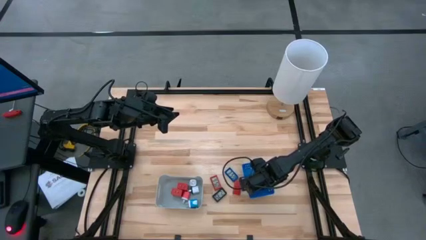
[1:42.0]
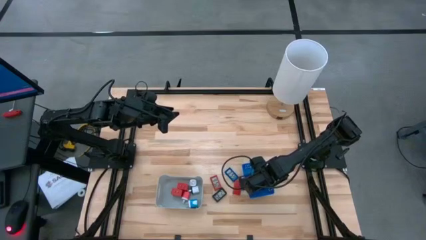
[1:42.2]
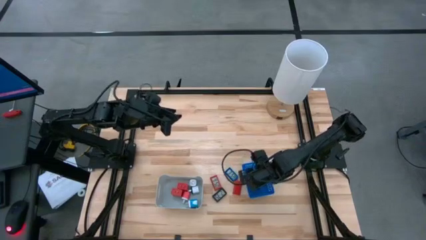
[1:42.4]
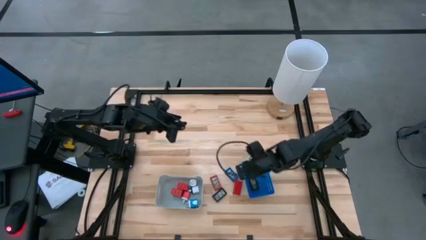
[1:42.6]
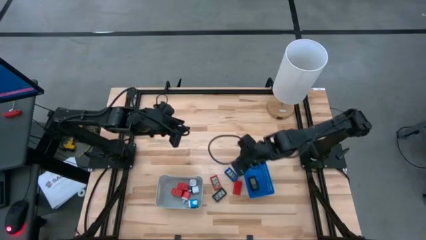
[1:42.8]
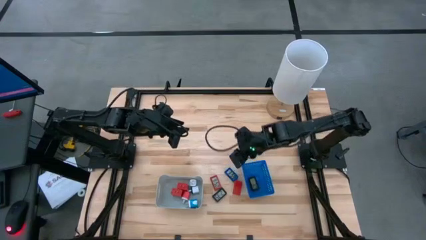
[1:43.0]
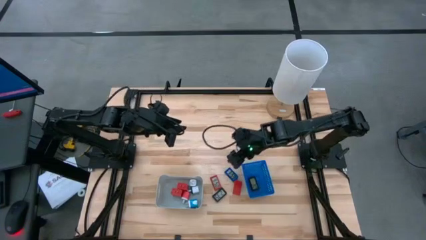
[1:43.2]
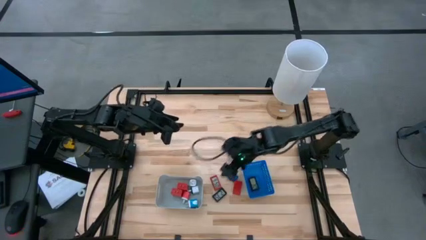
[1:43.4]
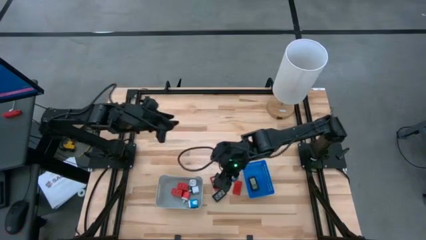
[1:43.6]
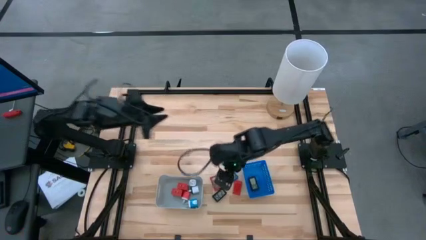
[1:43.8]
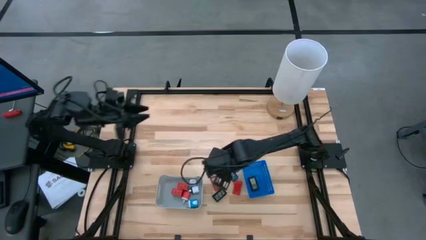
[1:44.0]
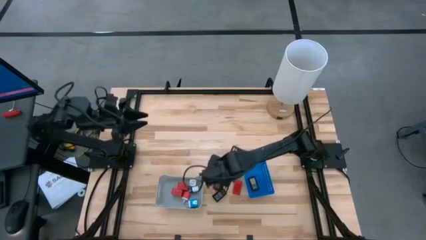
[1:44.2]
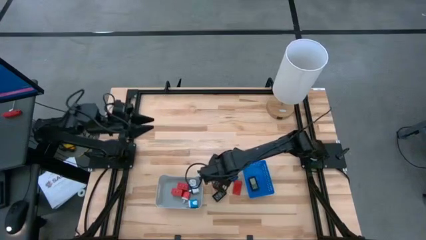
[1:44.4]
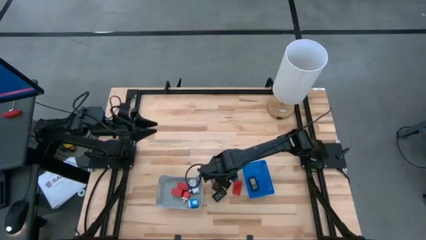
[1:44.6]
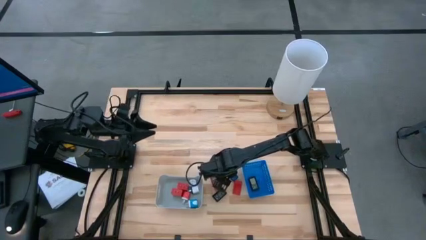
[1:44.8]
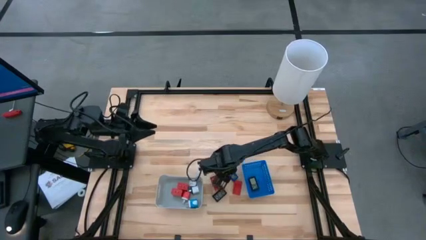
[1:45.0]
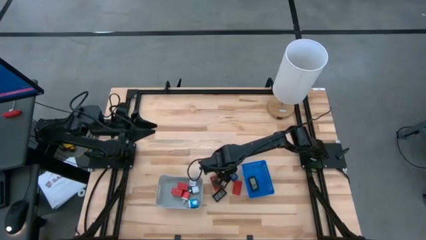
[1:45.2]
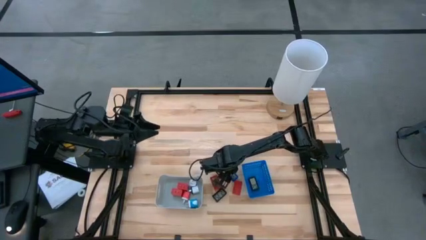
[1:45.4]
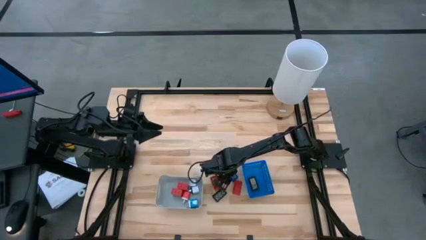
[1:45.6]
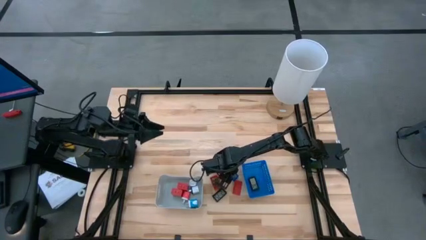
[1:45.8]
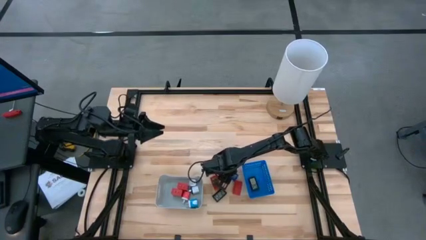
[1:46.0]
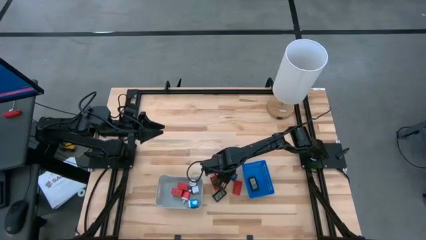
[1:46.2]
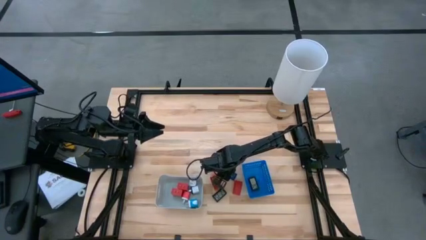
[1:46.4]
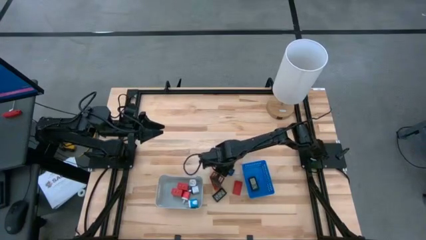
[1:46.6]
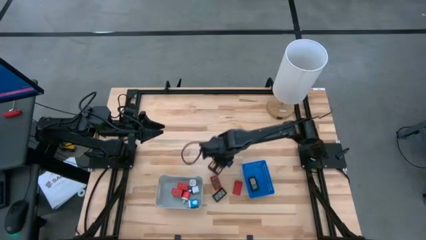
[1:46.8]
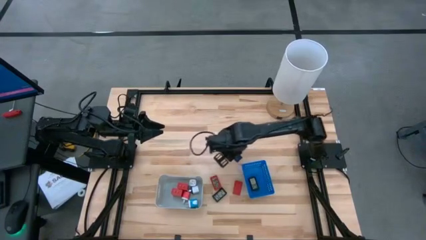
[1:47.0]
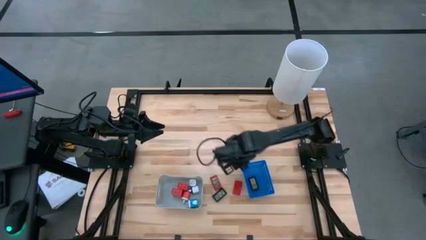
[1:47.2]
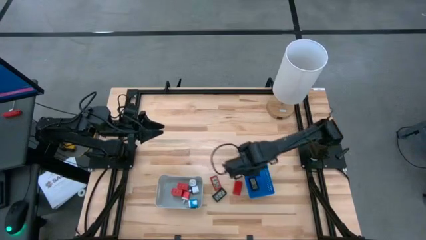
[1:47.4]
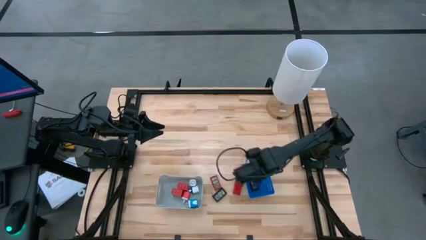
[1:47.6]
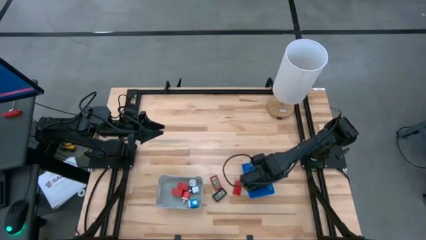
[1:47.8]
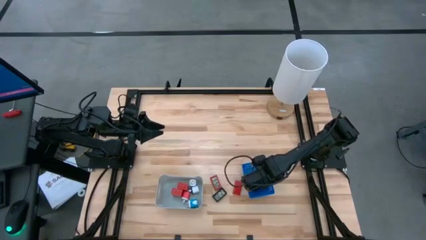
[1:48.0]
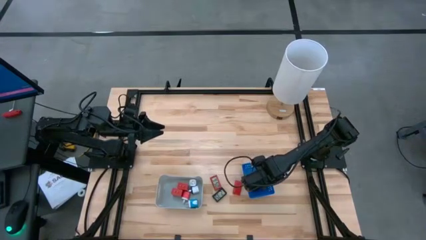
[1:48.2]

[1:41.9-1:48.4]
Task: Pick & Place Office items
Put the blue digital timer into the blue bin

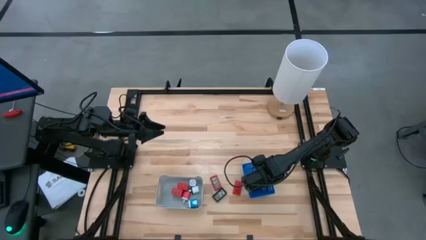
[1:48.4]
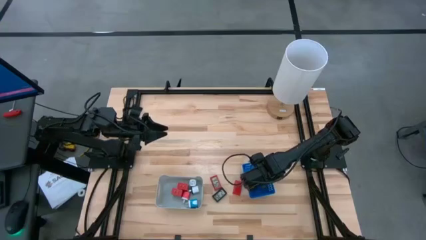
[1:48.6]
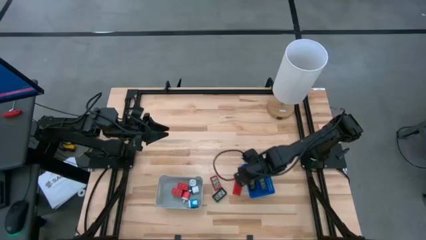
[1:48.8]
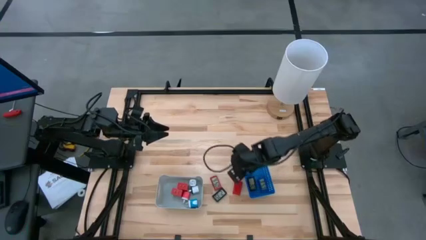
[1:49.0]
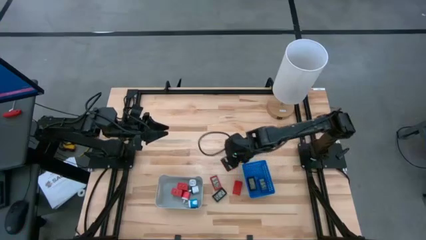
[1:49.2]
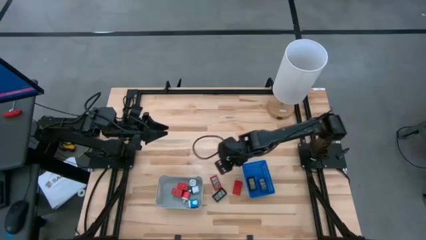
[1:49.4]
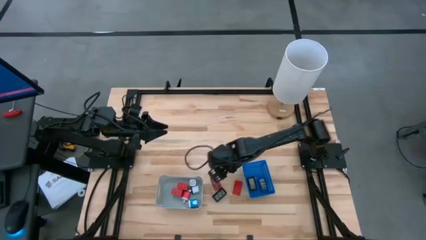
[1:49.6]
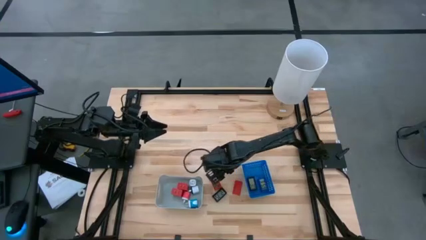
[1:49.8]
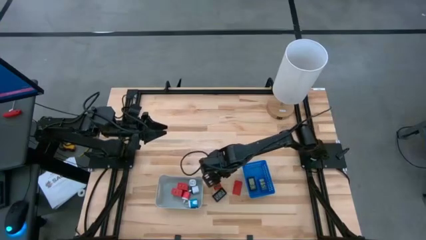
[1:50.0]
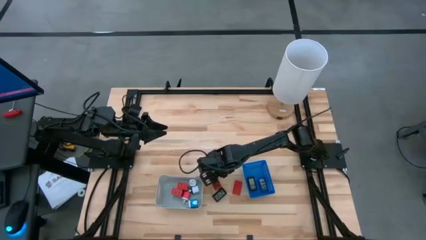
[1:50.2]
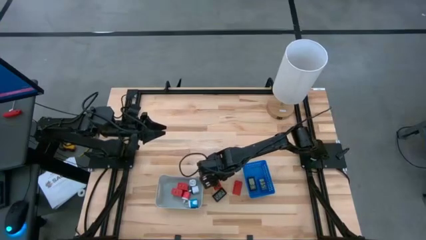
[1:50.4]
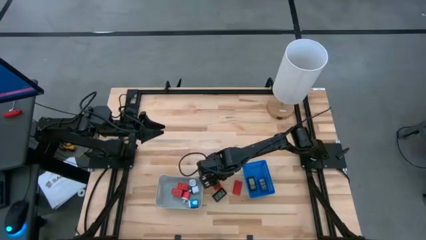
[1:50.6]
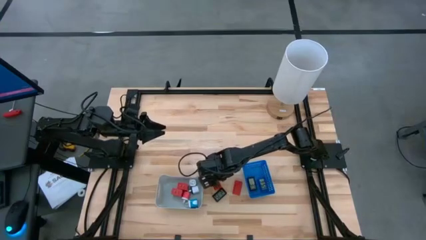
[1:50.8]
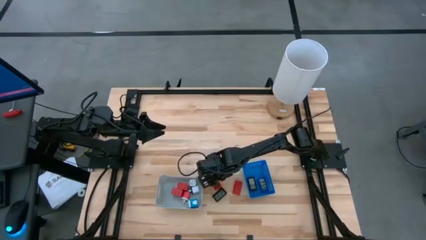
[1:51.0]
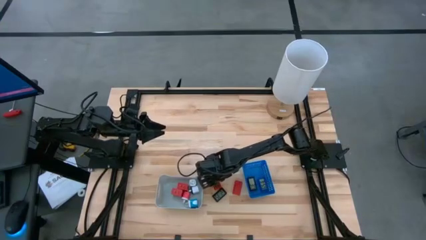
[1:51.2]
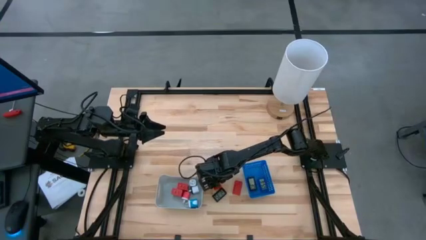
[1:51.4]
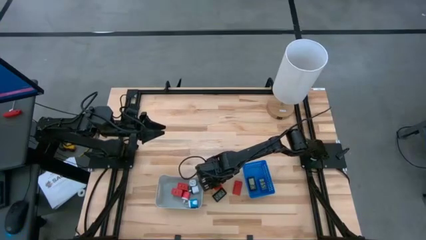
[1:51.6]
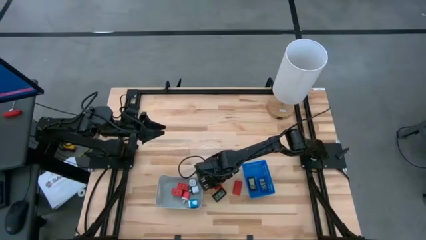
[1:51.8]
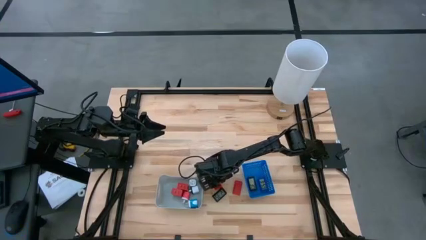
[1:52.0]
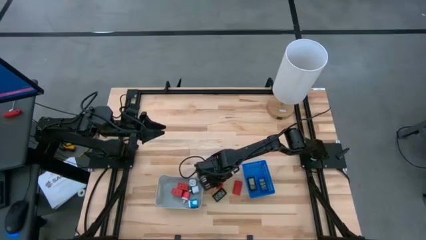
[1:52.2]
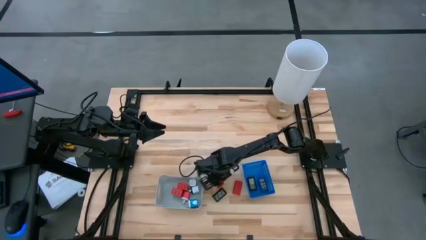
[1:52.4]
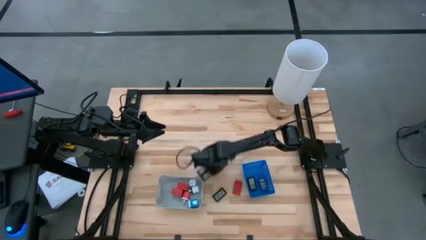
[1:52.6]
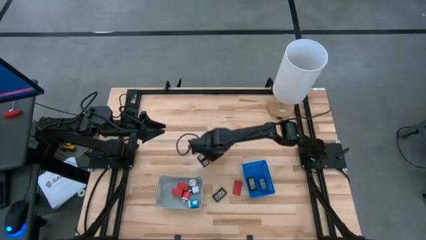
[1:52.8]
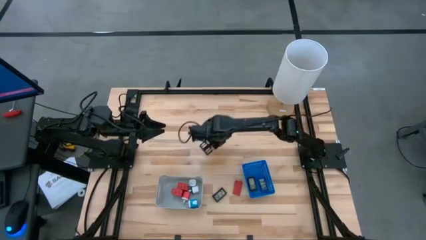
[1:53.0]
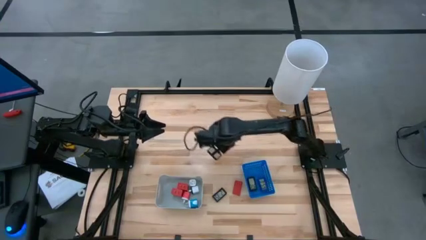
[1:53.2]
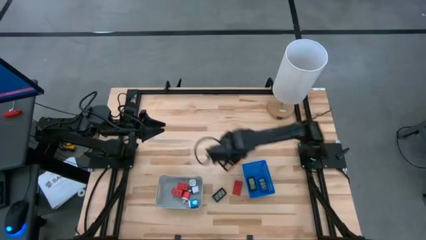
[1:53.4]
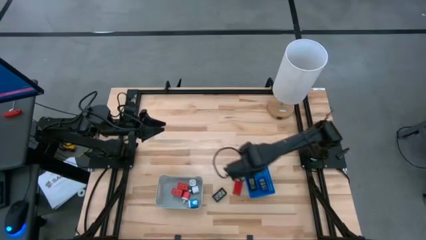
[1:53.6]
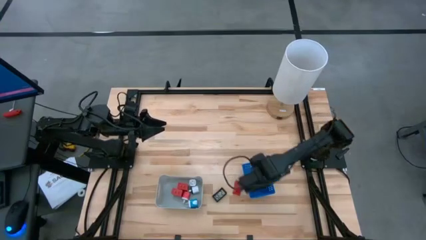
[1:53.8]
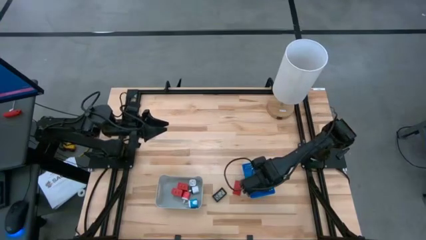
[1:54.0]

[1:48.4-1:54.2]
Put the left red digital timer into the blue bin

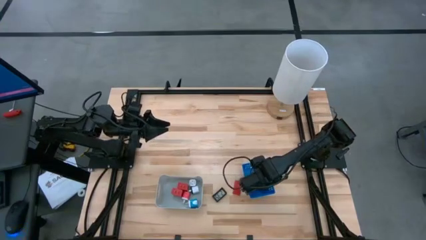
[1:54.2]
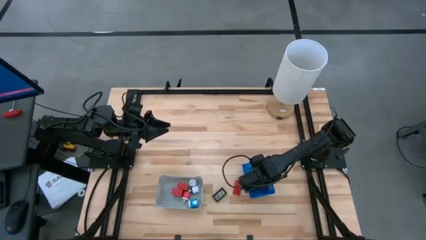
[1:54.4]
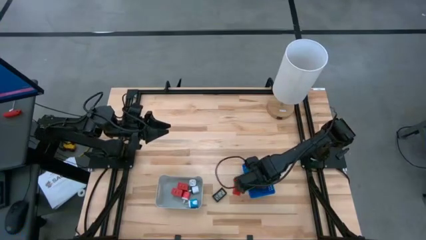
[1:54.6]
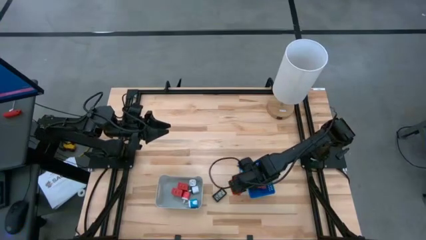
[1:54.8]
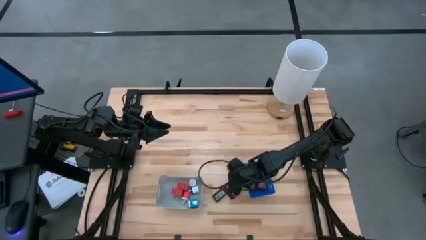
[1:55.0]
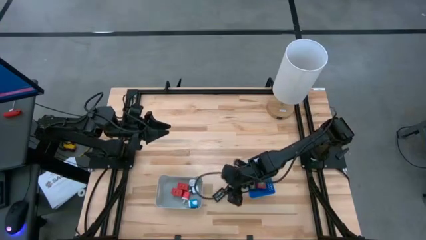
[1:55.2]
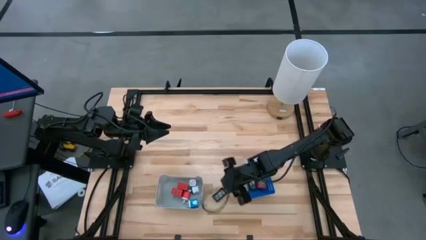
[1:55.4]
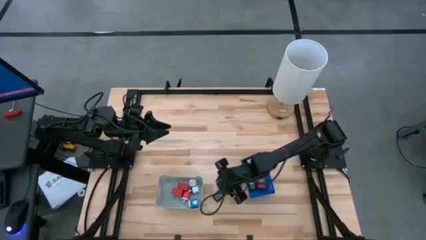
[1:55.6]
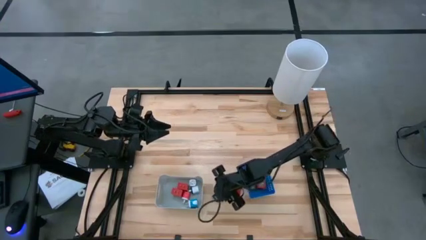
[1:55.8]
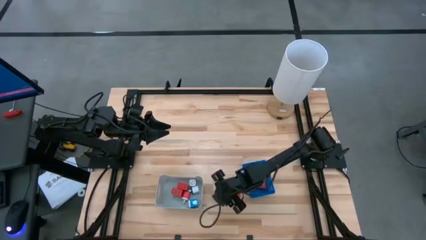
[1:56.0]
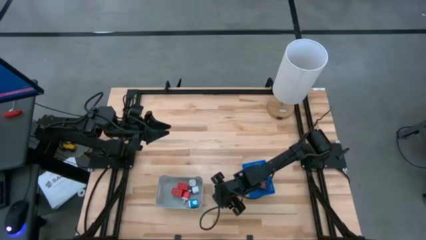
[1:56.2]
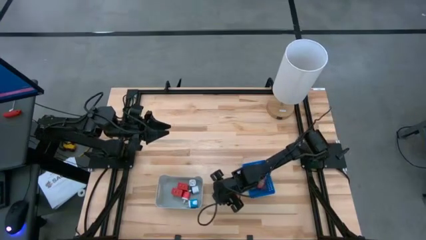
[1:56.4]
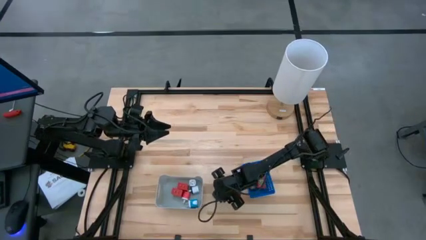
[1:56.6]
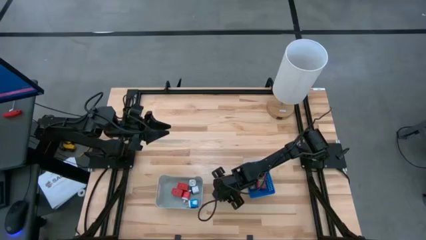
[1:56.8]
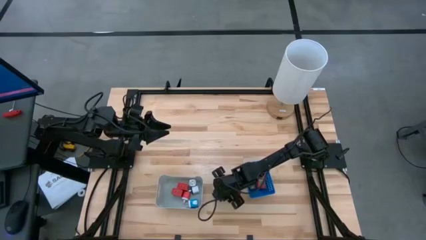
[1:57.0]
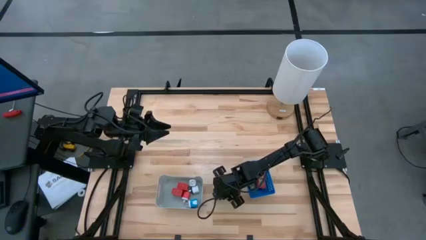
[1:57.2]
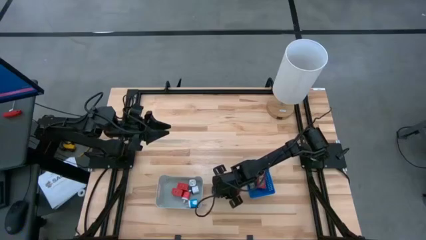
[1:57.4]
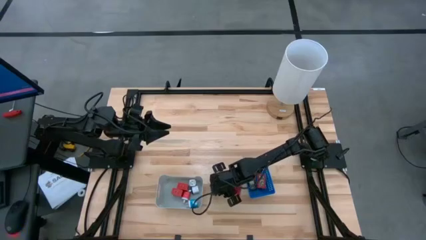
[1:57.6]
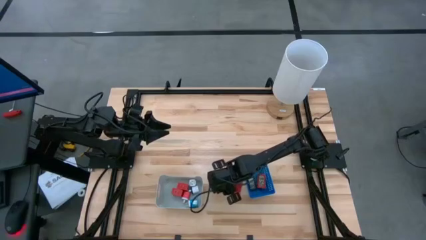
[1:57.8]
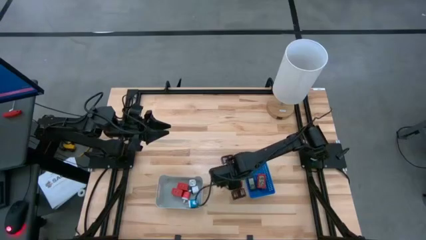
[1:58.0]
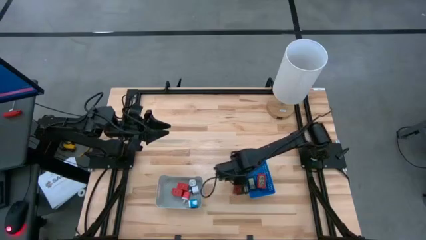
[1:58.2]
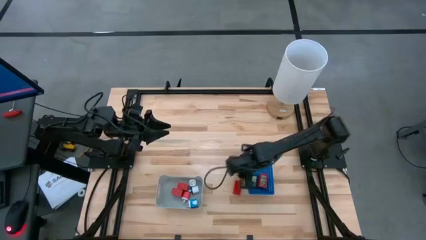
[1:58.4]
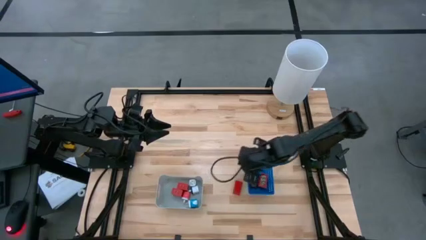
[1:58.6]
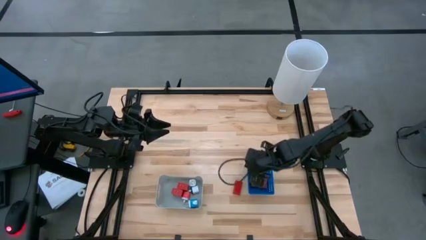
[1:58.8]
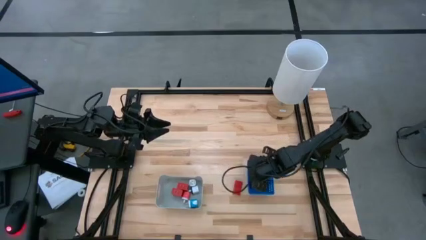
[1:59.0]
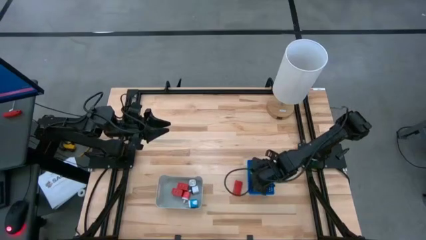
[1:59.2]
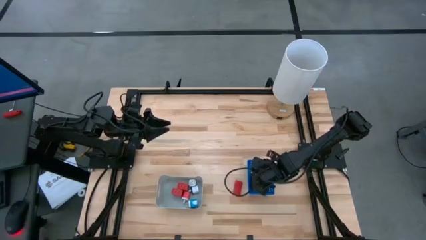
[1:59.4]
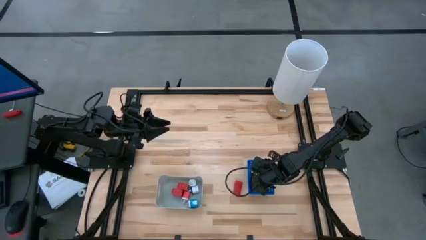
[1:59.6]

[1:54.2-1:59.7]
Put the black digital timer into the blue bin
